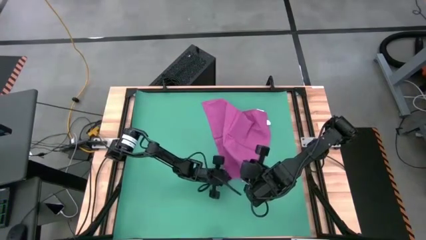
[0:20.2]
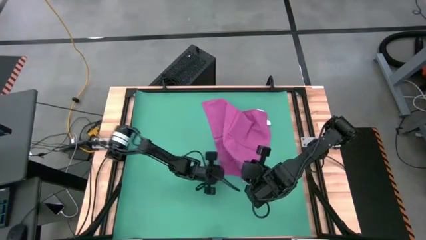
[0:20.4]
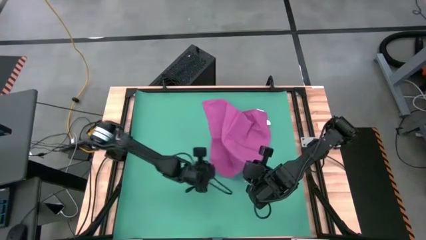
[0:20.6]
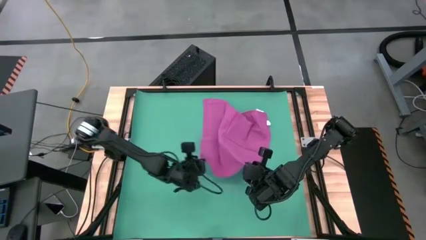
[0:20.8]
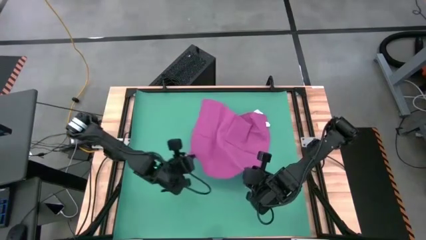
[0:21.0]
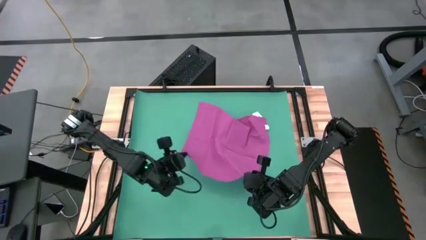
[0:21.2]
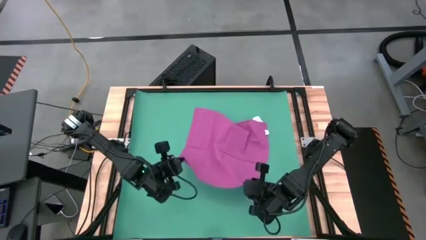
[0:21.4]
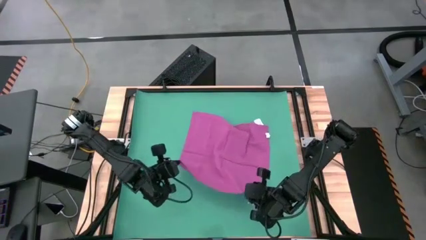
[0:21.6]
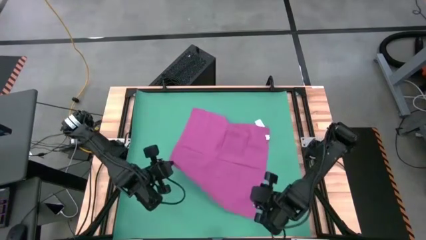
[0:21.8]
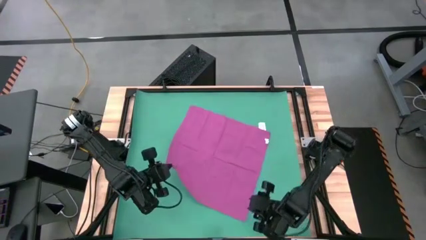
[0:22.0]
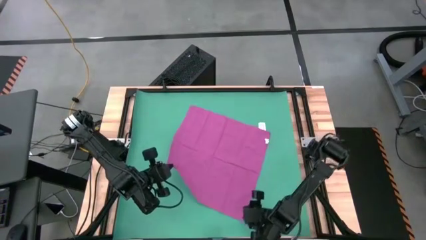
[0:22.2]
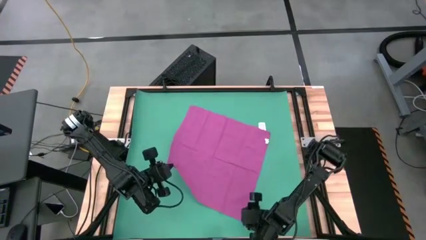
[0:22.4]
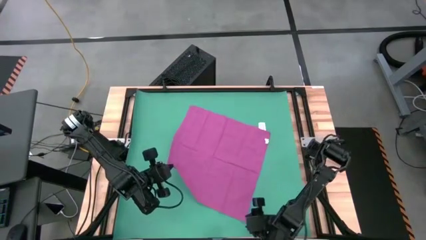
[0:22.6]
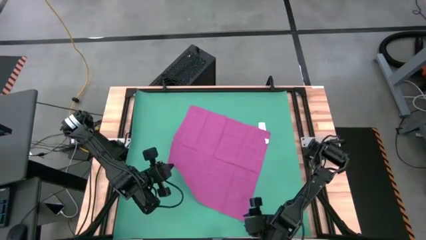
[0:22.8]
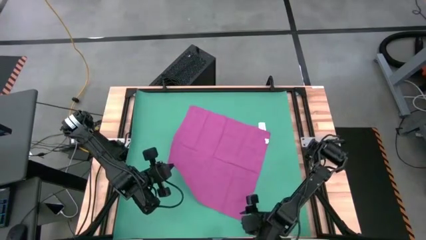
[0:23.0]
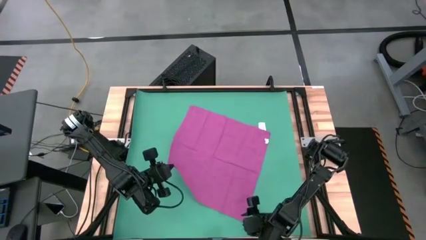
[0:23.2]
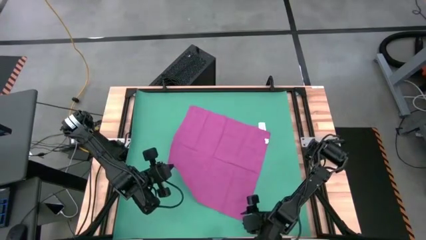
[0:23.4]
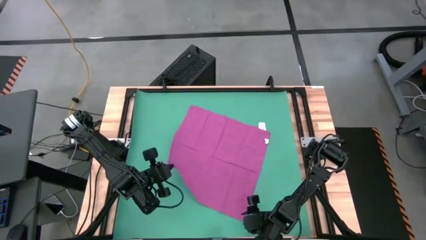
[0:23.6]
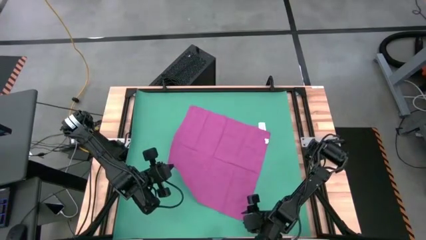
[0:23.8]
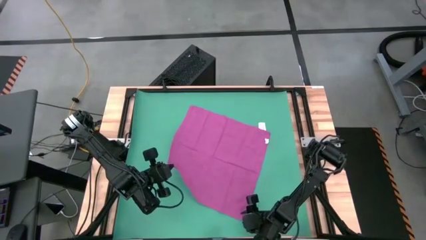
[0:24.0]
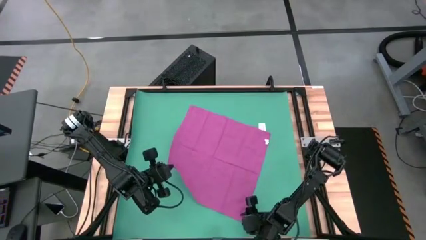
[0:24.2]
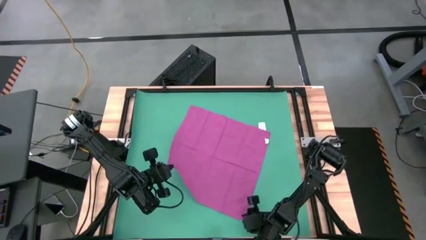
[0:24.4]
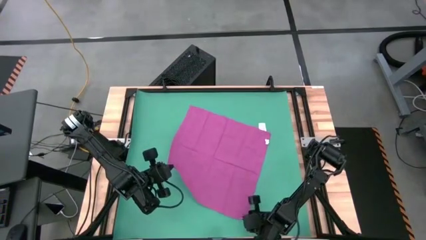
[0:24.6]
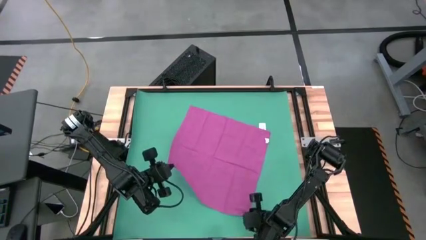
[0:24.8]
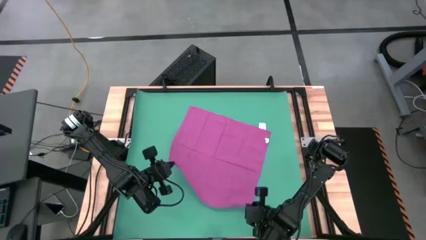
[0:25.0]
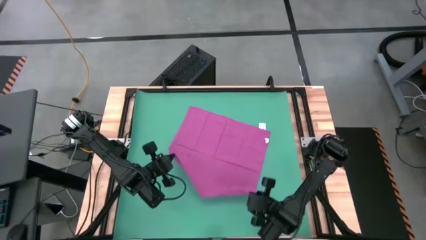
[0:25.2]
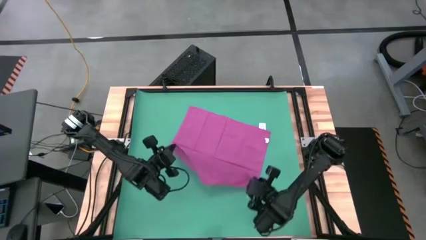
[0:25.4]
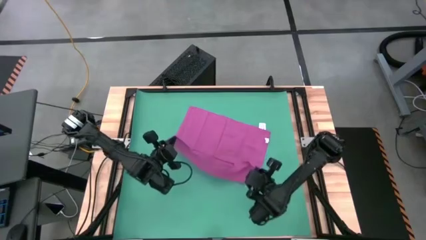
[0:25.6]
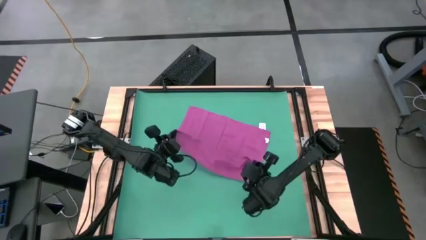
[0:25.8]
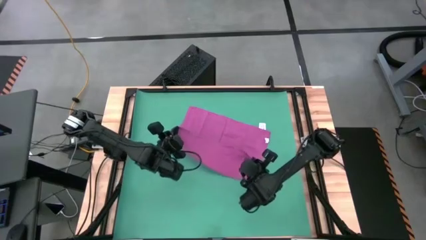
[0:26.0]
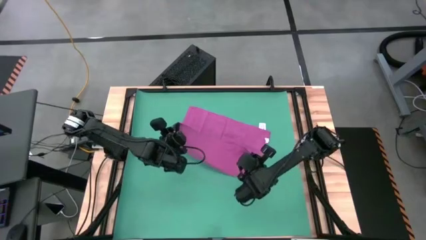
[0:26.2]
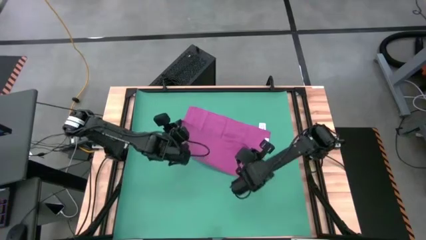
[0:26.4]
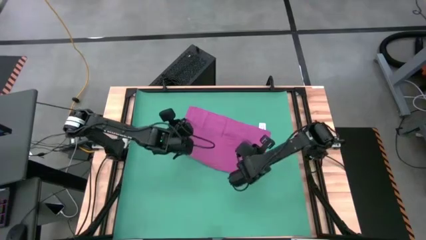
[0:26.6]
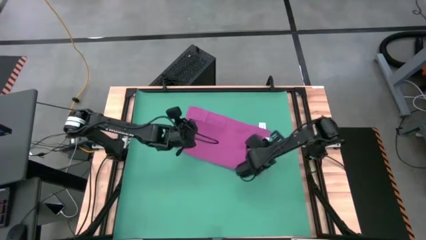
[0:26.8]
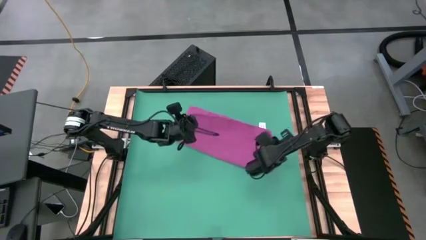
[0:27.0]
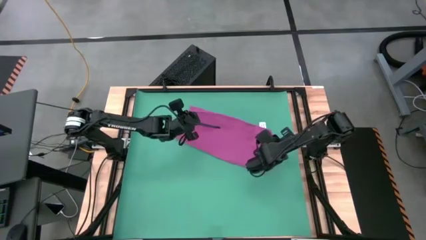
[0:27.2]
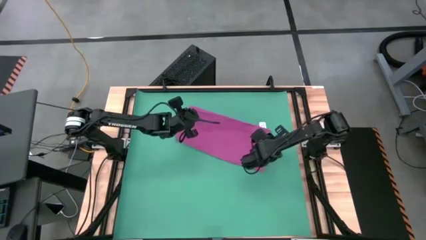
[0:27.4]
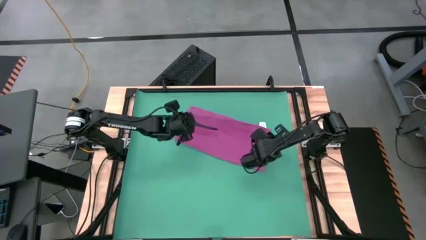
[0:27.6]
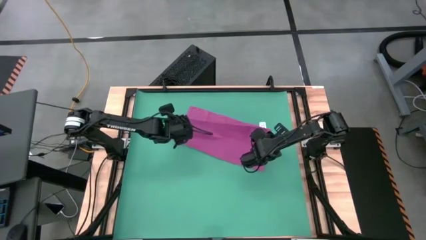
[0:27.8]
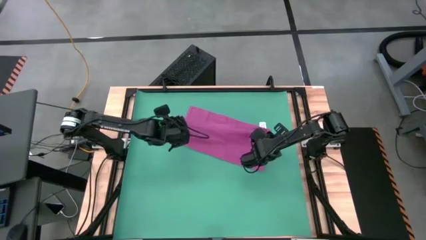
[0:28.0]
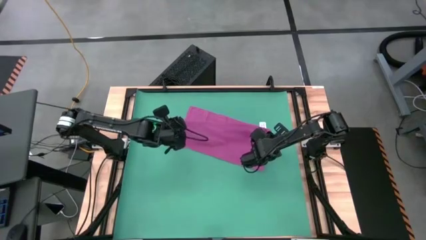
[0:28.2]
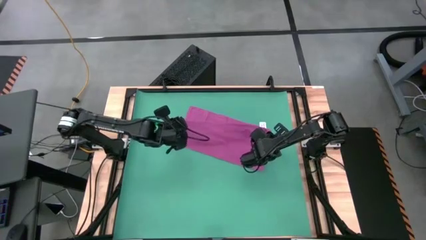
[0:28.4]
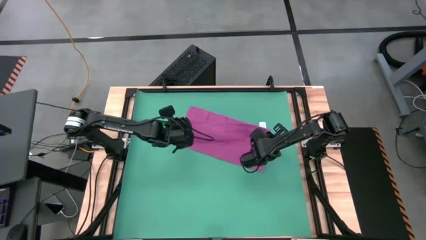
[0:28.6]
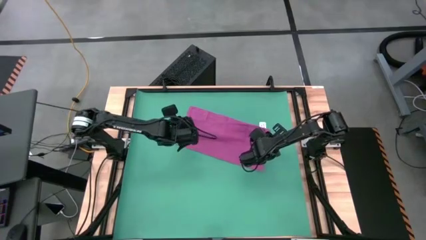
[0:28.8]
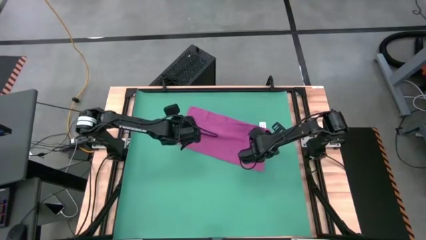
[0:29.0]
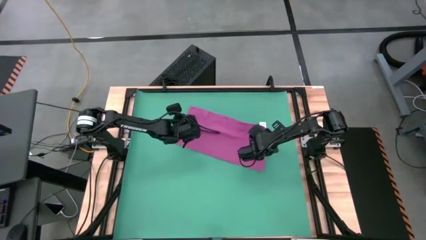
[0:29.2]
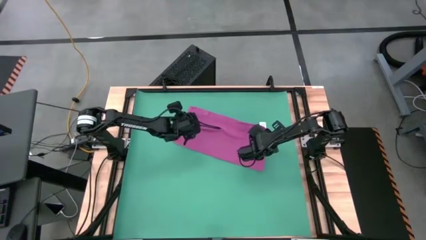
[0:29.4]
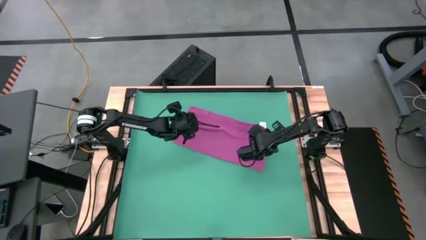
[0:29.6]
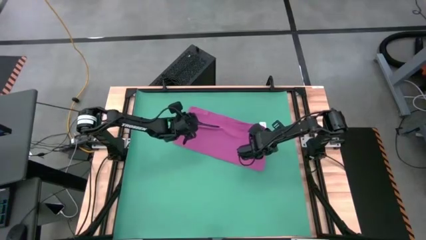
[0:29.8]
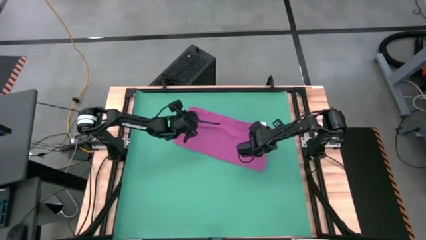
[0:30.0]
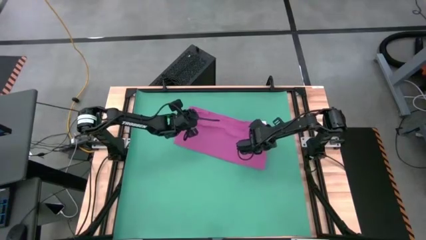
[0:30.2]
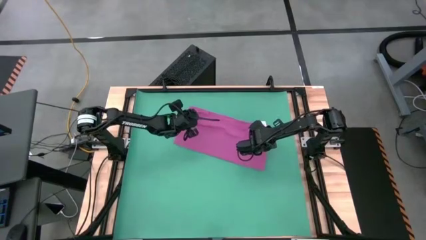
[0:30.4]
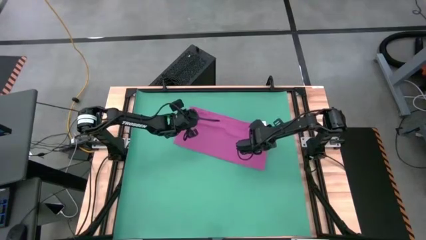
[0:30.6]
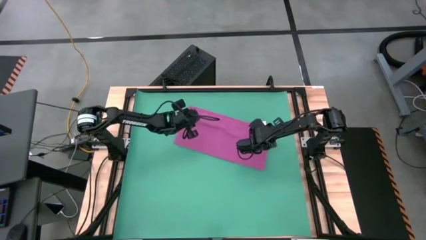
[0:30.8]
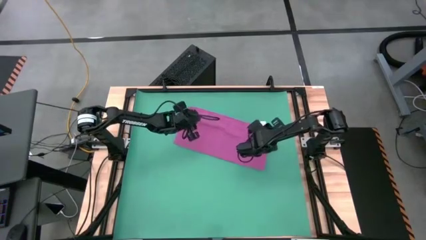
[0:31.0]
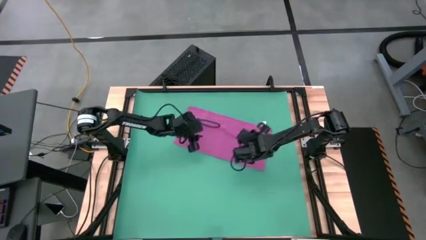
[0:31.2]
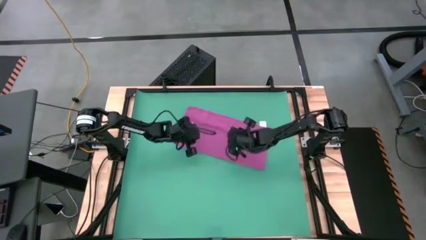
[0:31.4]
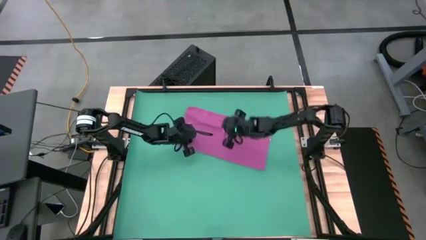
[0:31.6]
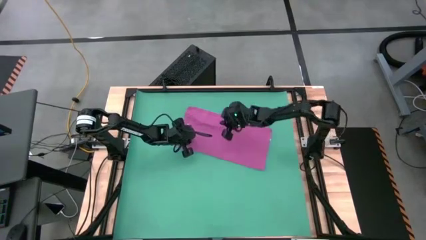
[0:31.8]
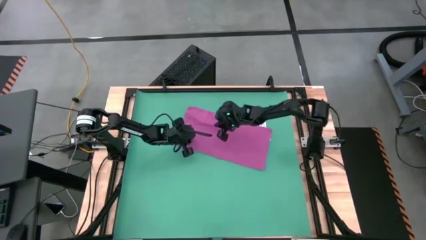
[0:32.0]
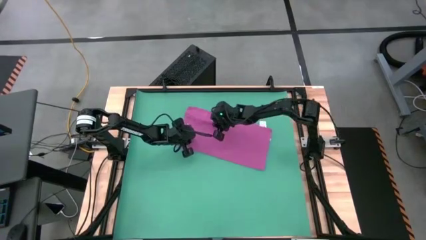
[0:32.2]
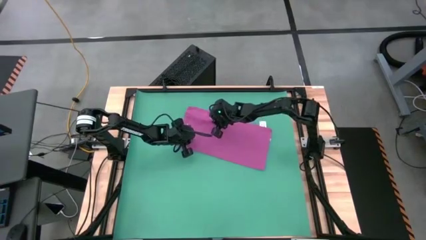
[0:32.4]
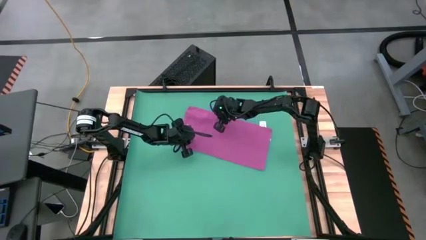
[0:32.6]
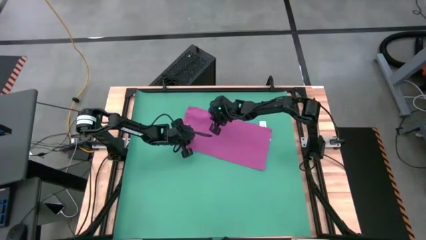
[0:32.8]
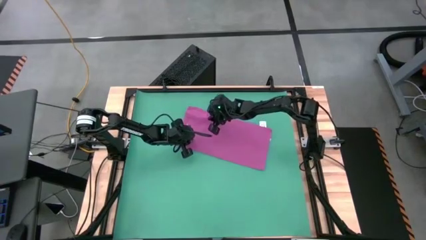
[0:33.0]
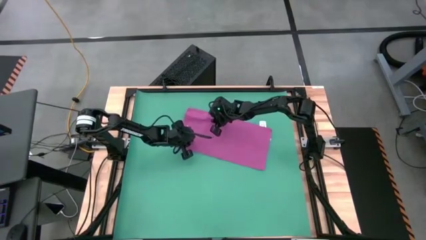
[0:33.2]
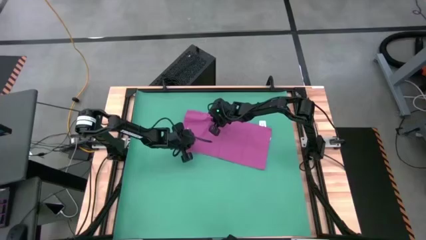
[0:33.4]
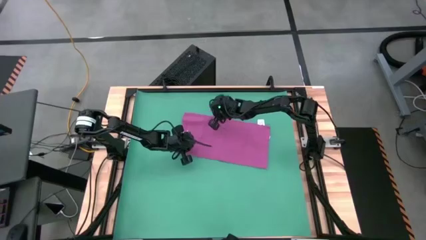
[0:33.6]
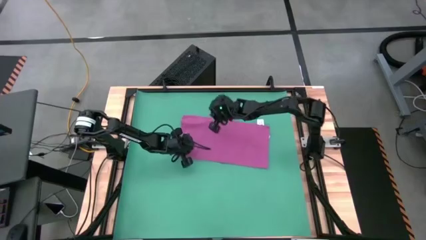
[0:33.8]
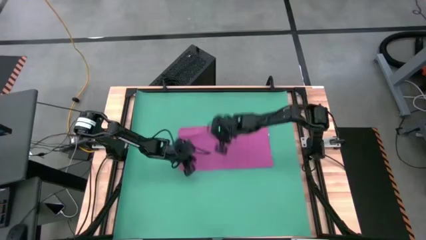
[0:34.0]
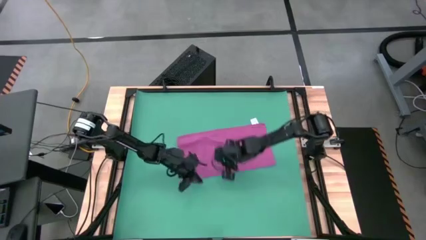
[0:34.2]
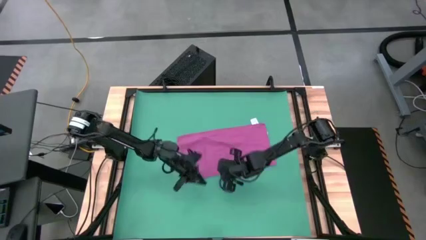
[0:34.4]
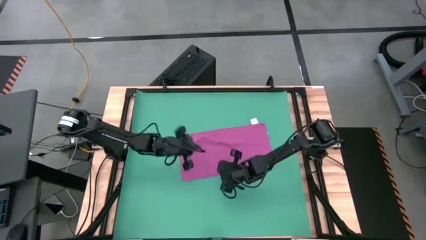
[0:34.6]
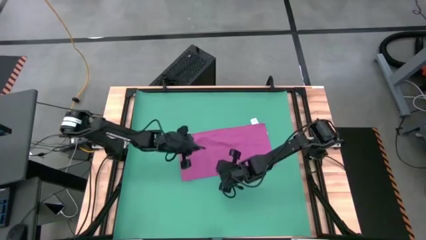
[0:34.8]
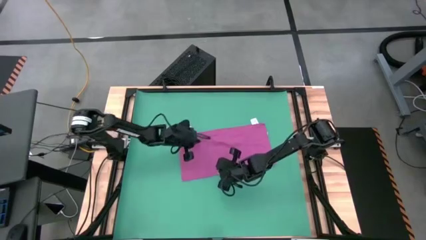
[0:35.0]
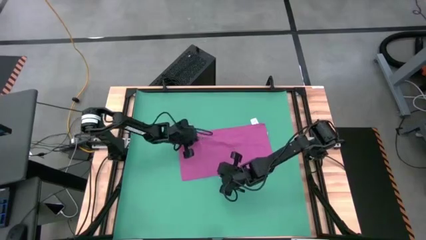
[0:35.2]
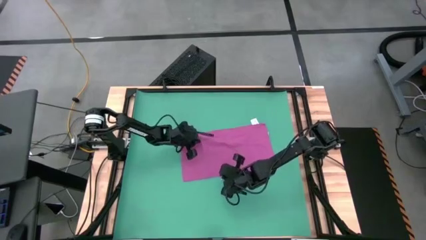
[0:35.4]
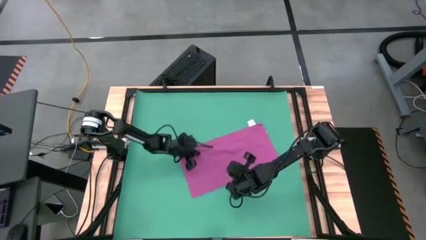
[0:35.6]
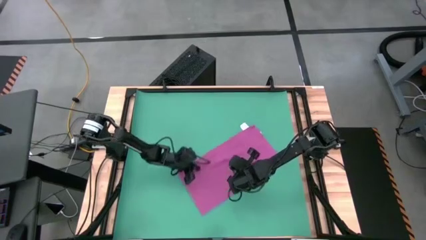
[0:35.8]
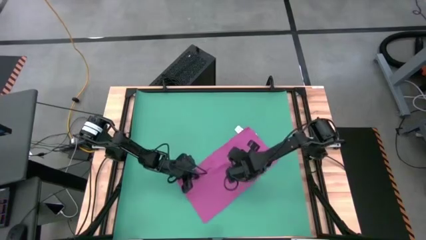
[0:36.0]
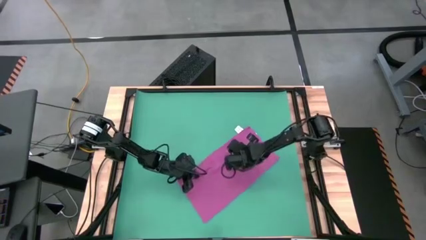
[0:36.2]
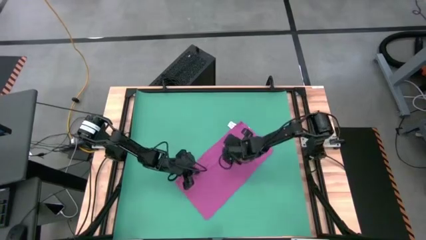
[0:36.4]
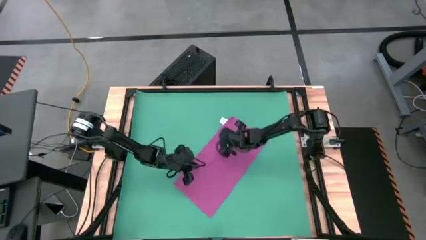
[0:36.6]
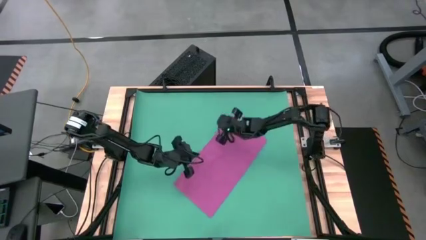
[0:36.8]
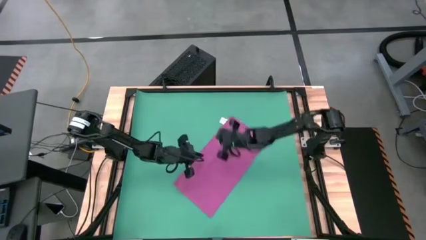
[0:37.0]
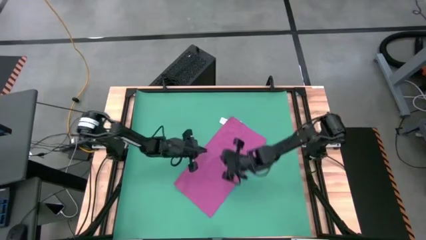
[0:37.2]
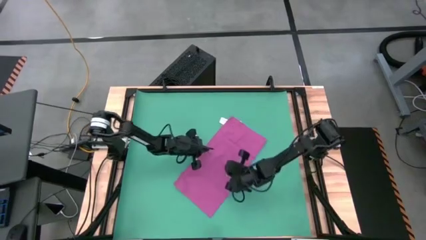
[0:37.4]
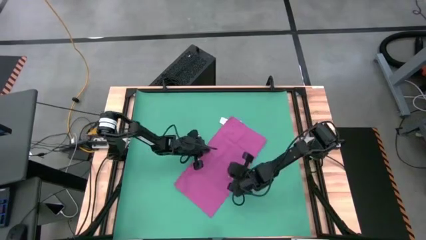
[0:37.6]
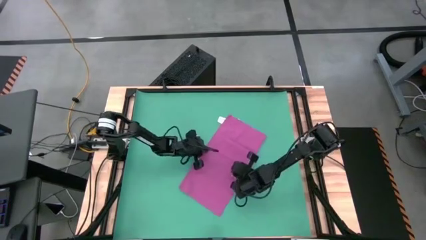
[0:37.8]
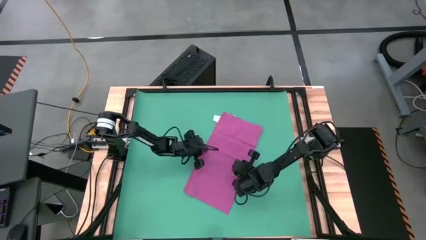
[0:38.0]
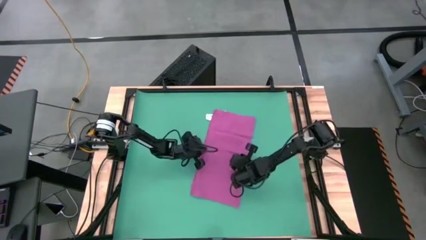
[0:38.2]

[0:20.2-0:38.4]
Task: Roll towel
Roll the pink towel
